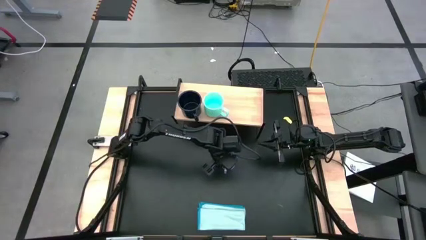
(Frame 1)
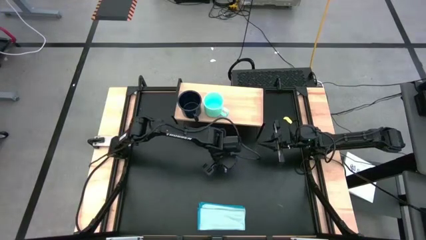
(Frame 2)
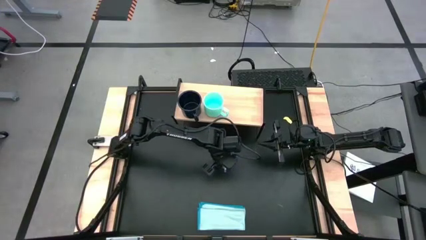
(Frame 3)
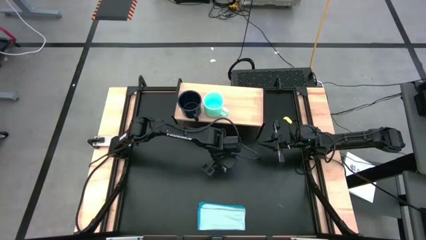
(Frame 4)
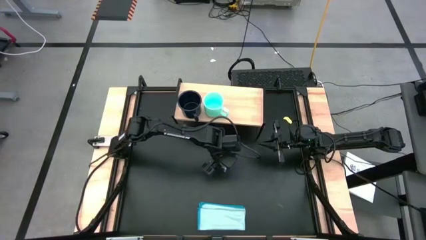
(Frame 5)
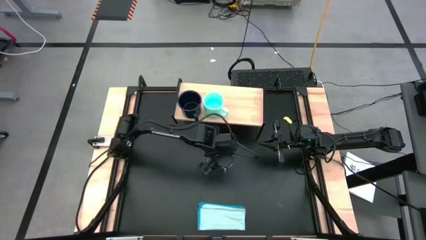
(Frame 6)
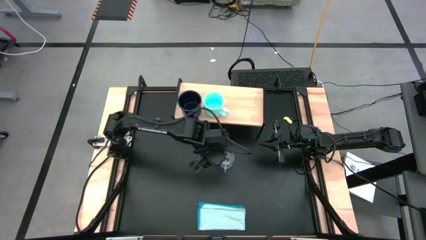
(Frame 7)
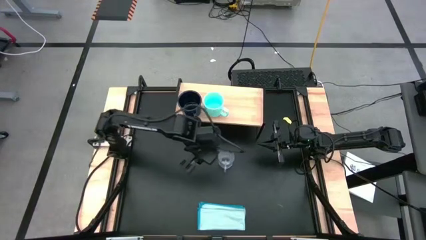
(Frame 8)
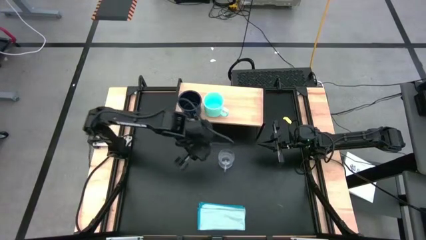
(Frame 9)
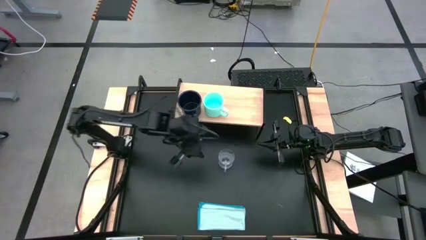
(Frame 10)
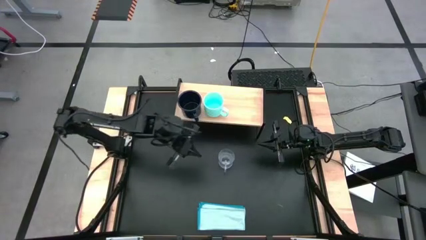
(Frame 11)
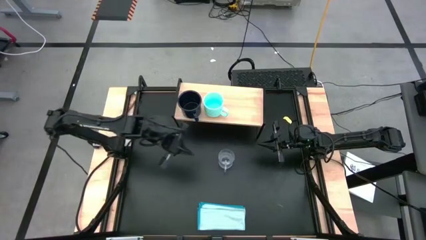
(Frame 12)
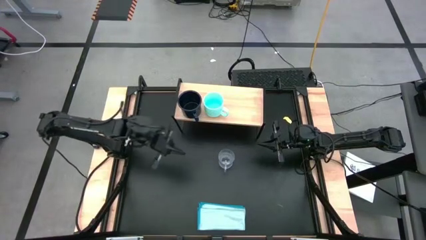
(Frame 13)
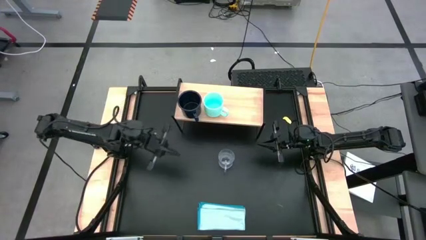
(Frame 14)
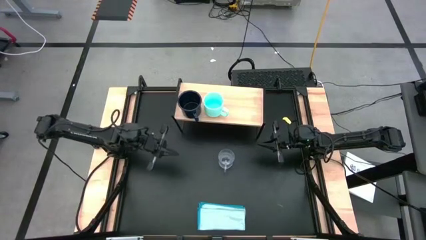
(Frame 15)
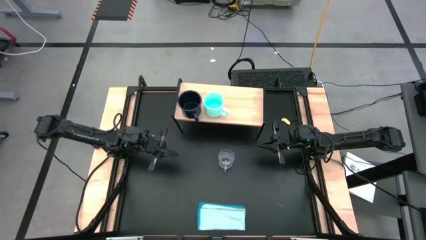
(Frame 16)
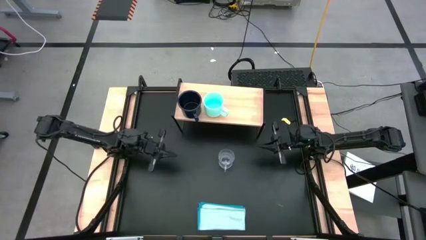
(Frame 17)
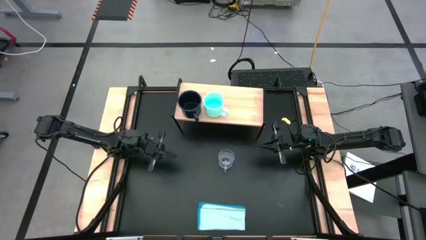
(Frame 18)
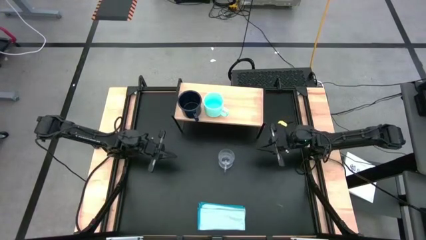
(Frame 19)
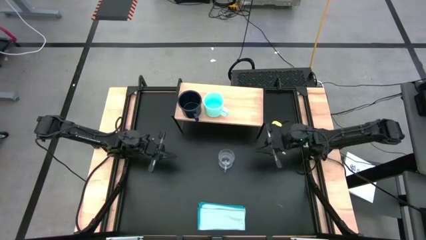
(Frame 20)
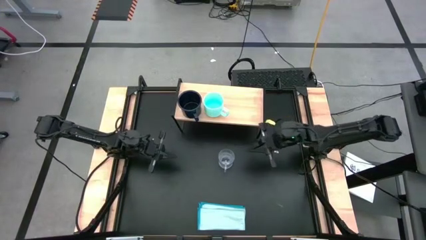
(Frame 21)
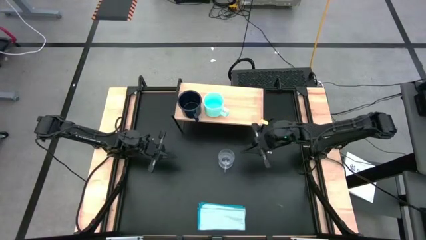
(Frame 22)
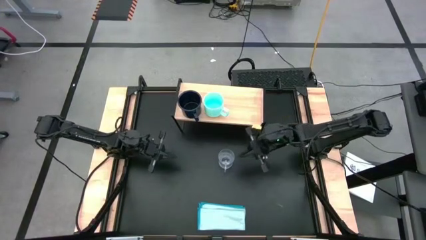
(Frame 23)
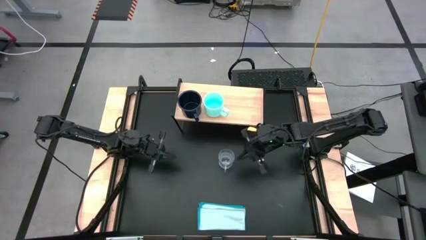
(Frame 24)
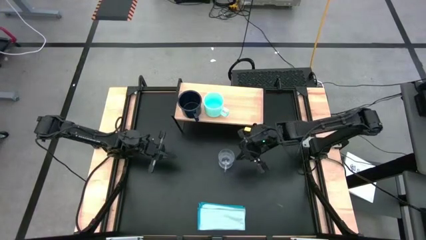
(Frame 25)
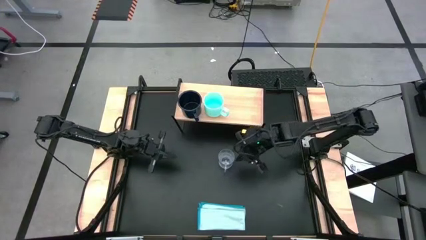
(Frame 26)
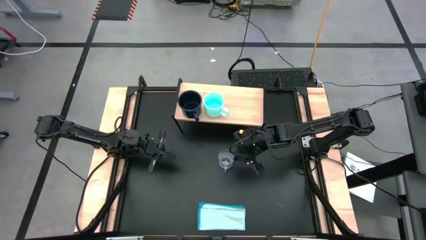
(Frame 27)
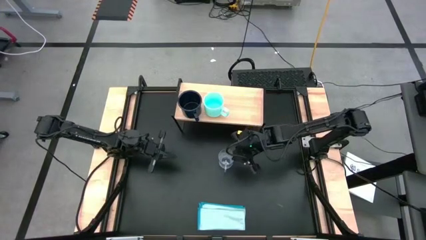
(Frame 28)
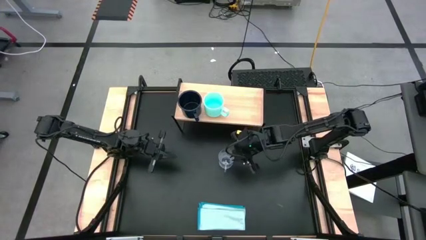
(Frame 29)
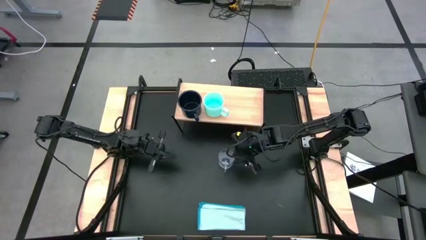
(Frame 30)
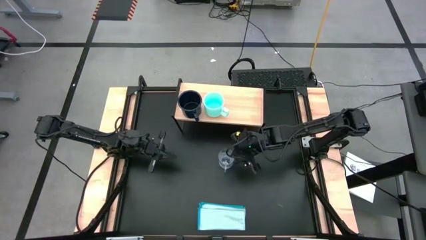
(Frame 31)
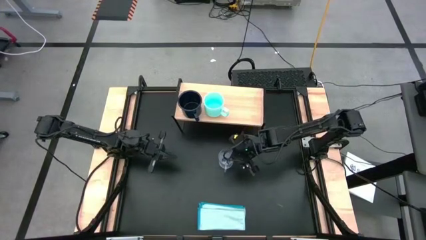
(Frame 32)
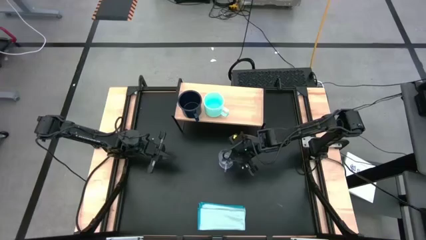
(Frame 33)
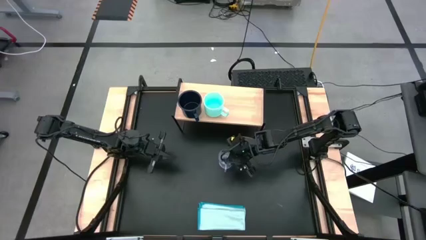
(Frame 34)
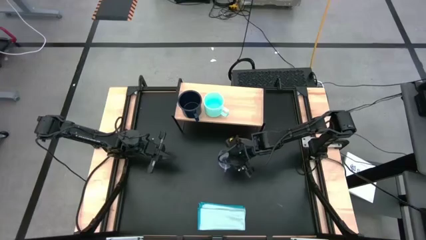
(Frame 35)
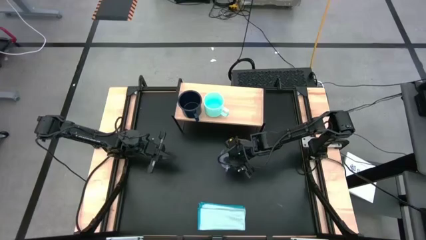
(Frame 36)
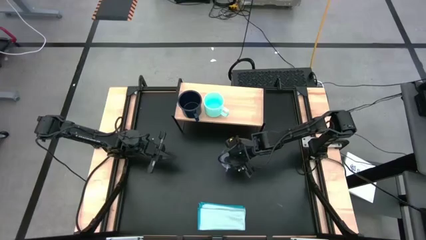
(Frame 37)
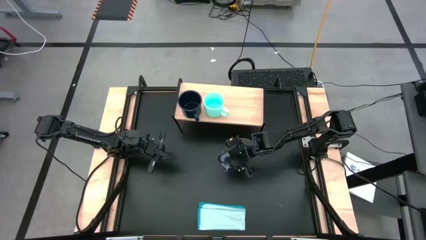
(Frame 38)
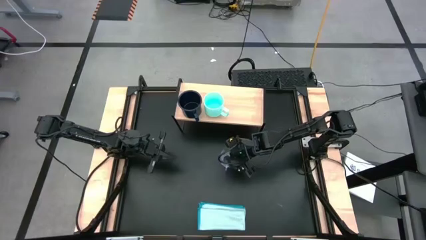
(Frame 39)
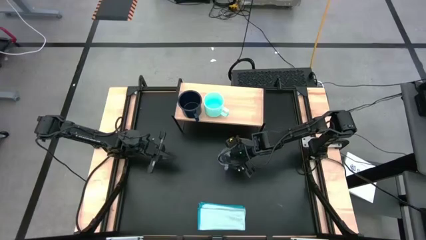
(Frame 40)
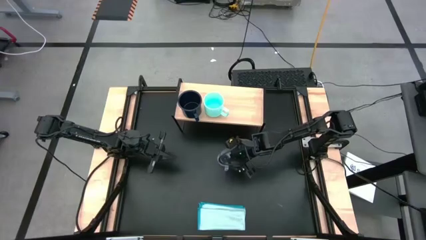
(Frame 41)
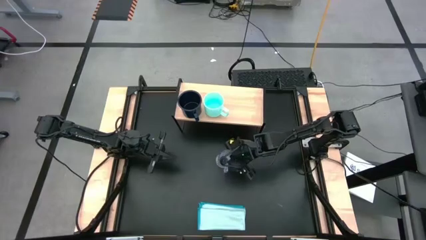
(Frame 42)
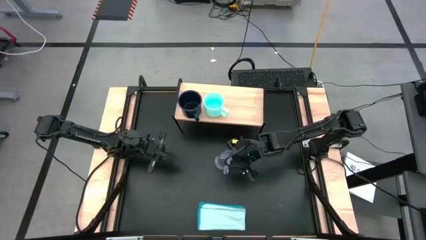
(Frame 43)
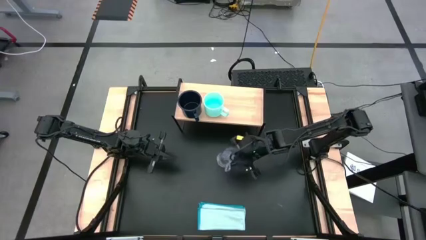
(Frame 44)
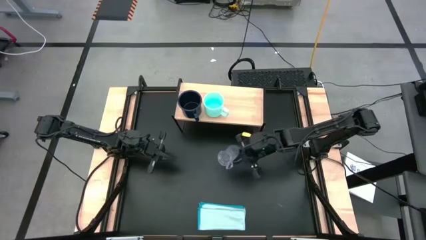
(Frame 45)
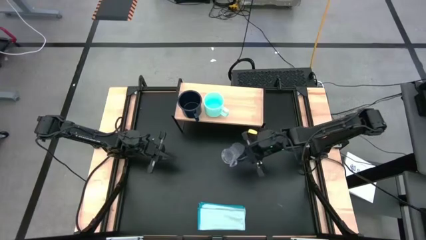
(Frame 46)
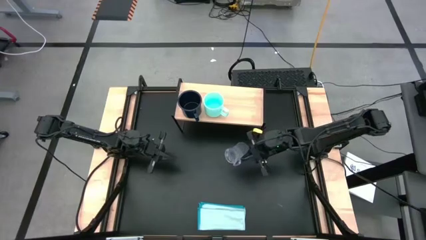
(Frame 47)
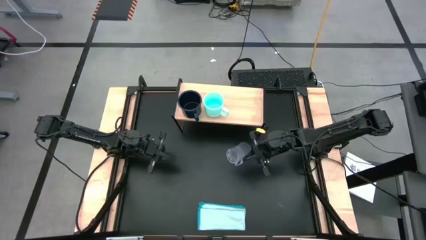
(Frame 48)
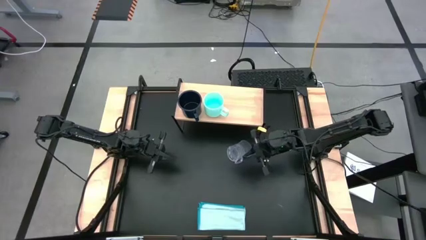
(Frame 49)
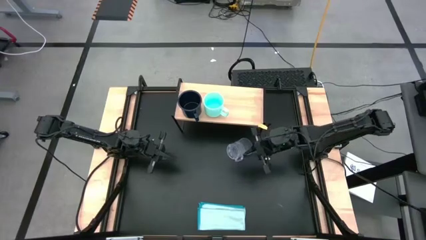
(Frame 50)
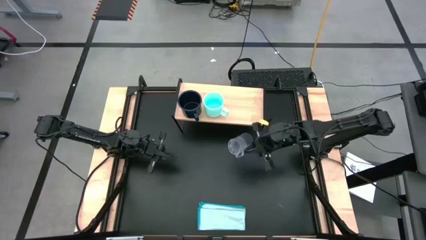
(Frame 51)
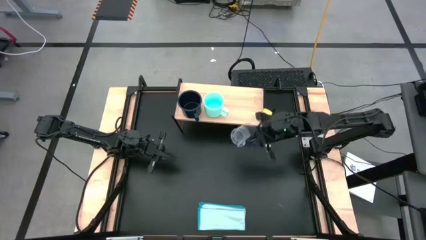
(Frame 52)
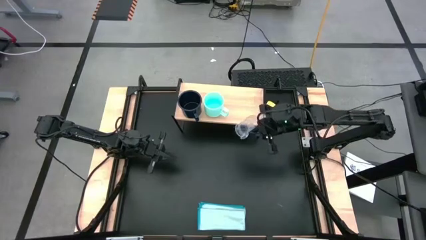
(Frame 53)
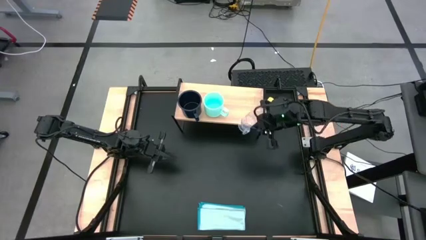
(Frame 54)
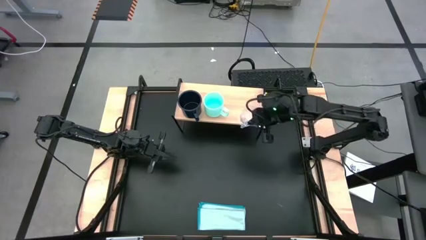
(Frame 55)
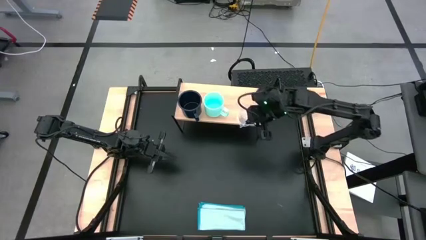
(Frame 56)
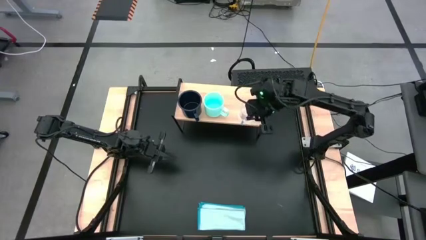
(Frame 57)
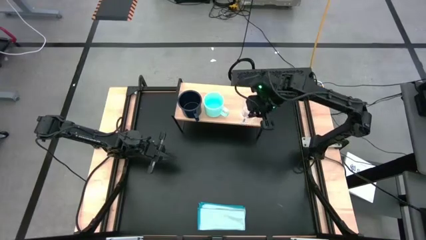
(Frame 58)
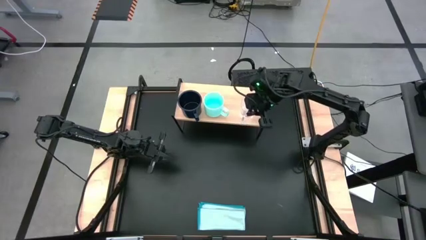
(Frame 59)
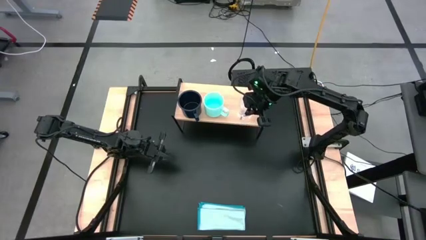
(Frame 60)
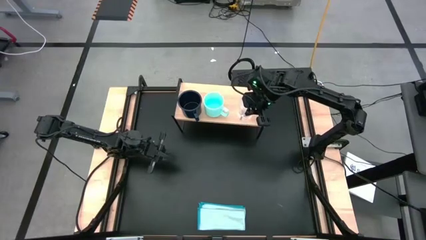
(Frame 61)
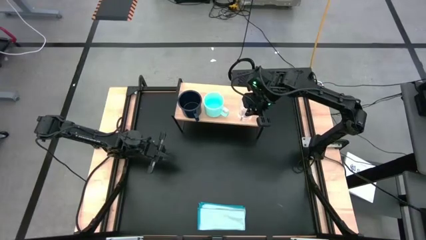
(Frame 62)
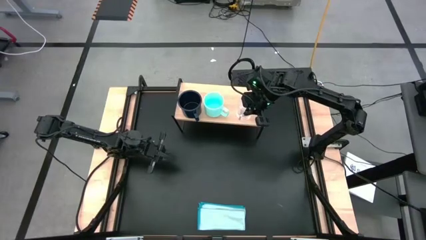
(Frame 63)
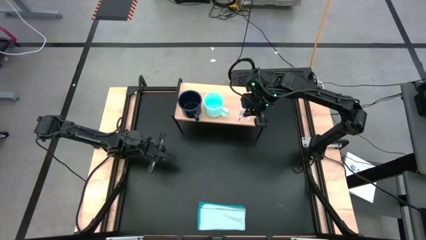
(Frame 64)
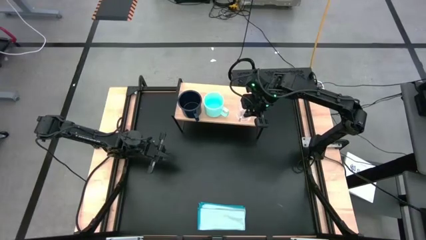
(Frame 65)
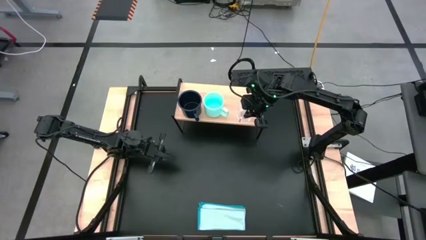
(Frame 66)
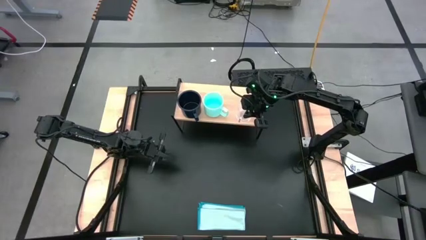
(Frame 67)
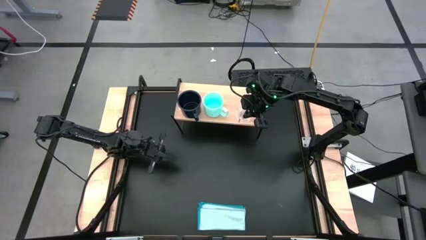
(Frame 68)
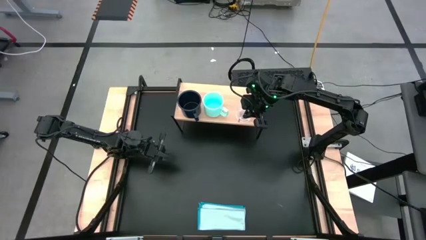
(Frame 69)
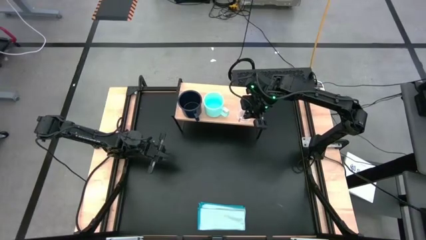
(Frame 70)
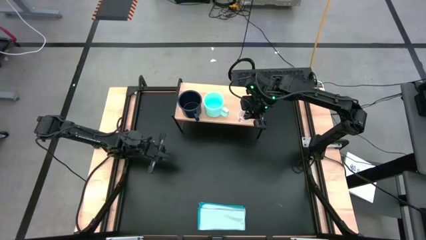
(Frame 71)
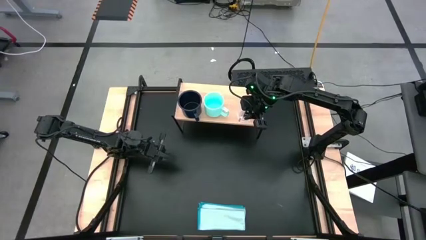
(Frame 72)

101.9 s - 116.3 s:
Task: Stack small to large cups/mugs on shelf
Put the transparent mug on the shelf
